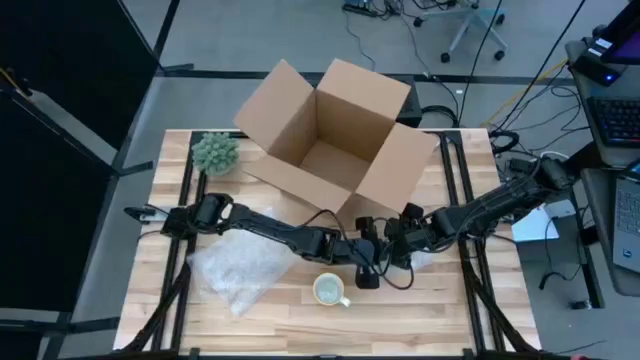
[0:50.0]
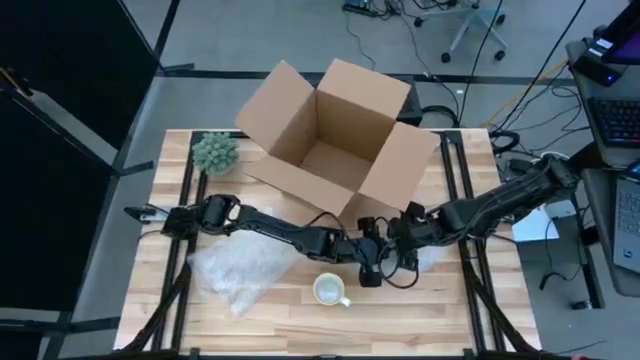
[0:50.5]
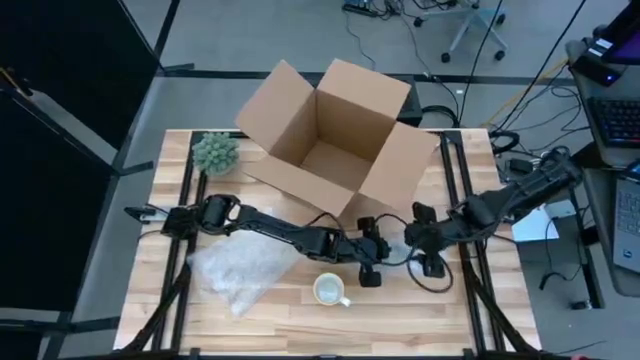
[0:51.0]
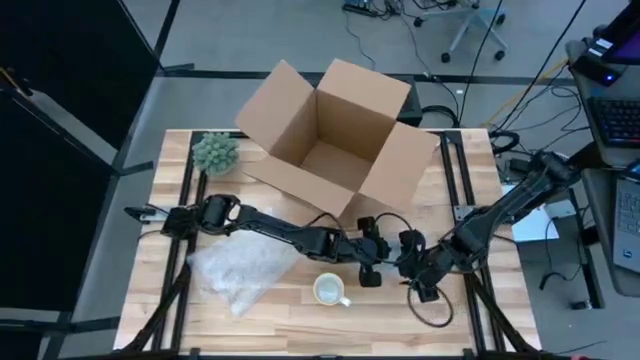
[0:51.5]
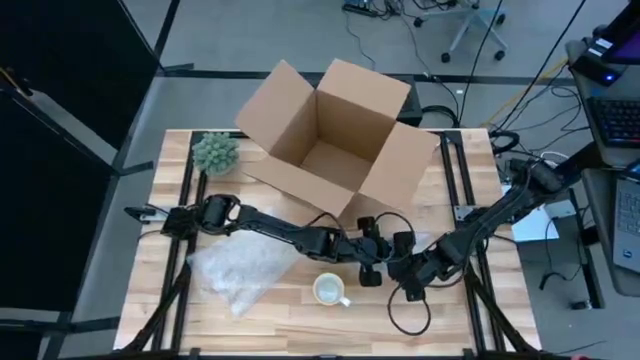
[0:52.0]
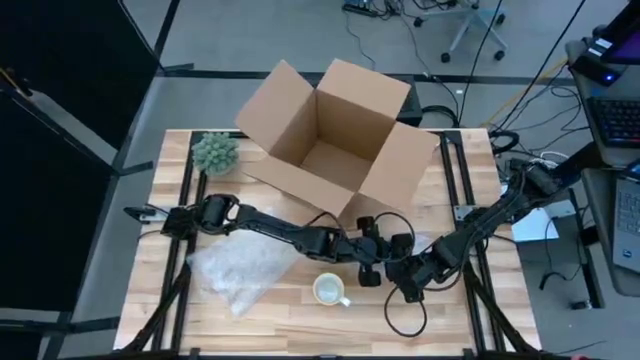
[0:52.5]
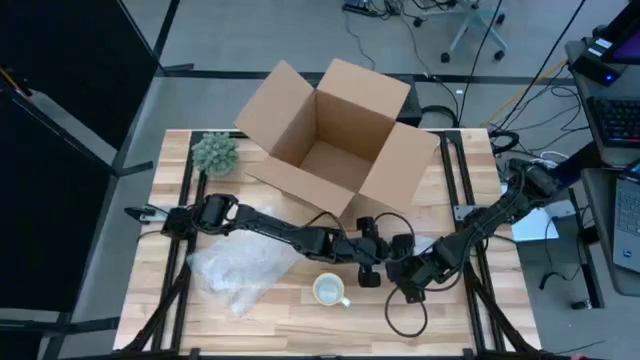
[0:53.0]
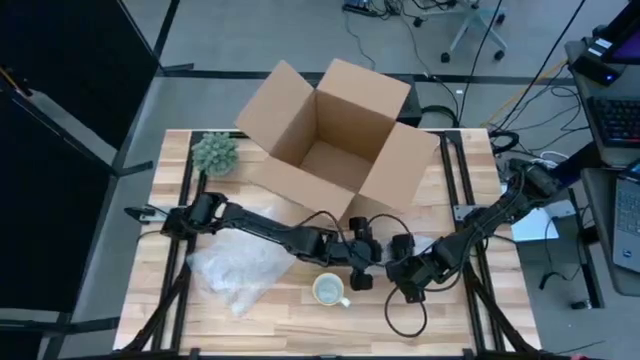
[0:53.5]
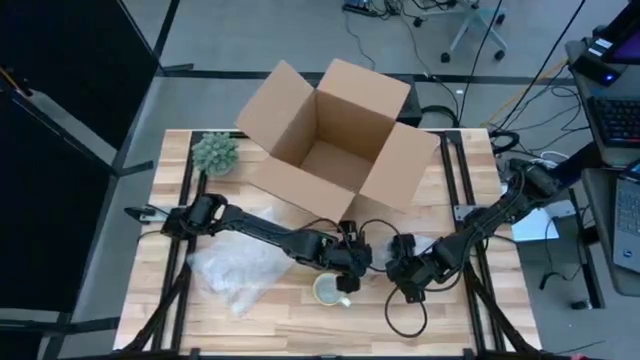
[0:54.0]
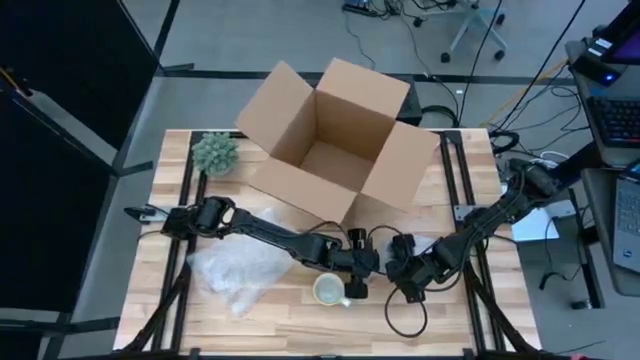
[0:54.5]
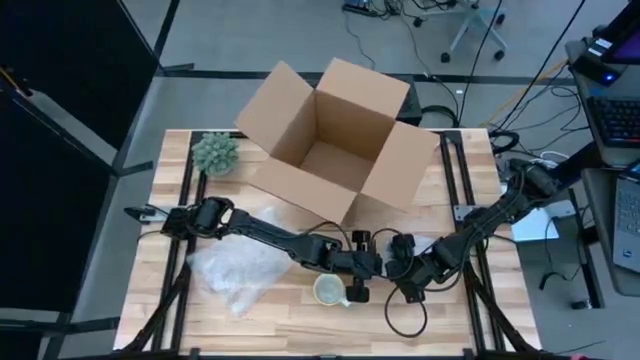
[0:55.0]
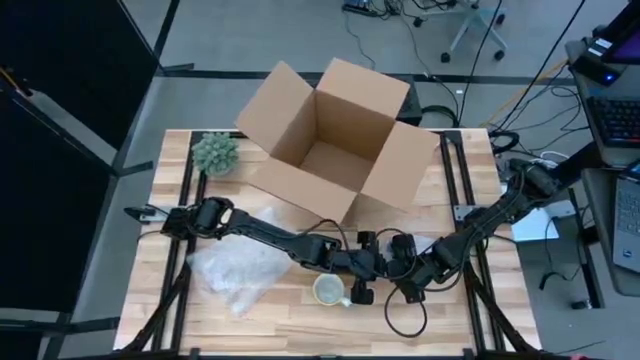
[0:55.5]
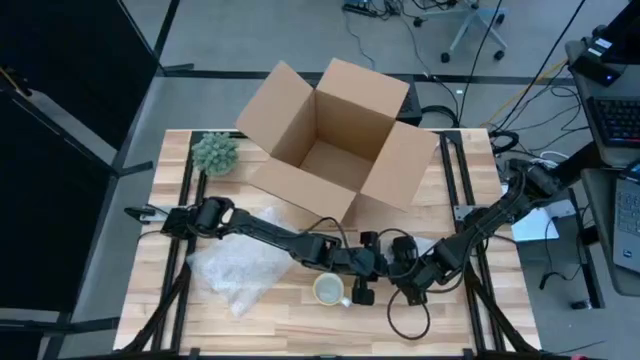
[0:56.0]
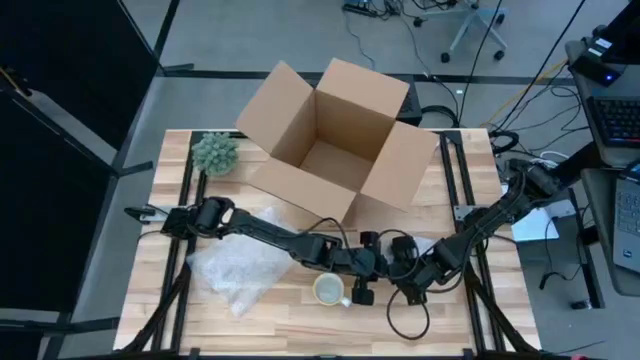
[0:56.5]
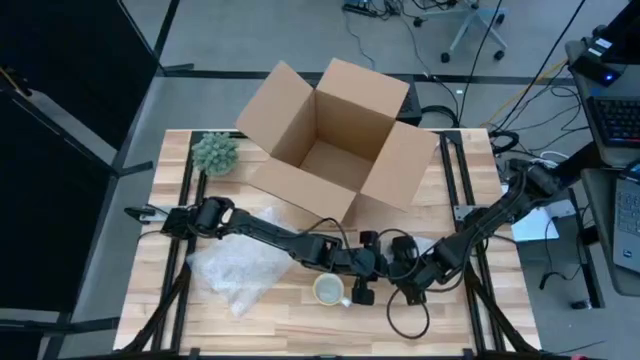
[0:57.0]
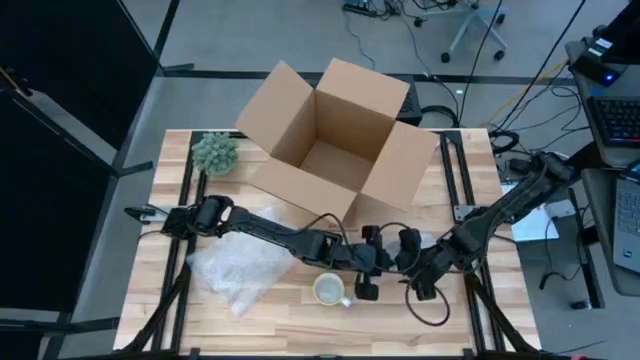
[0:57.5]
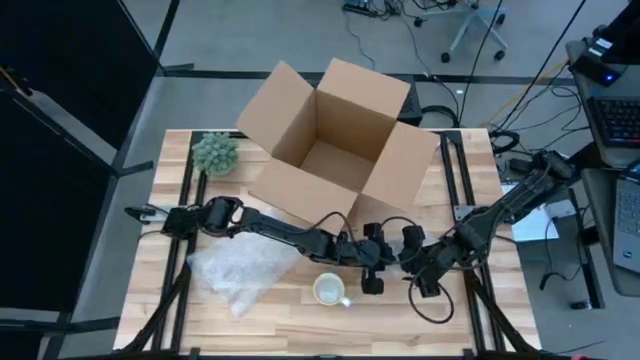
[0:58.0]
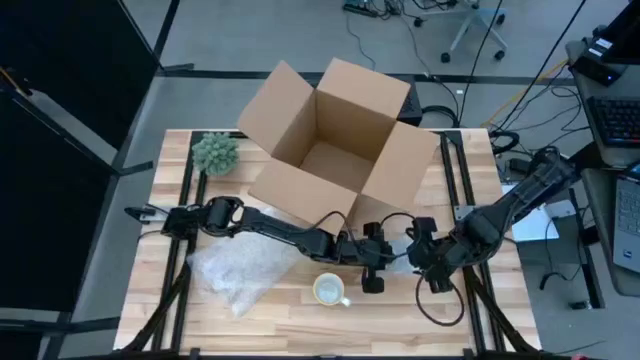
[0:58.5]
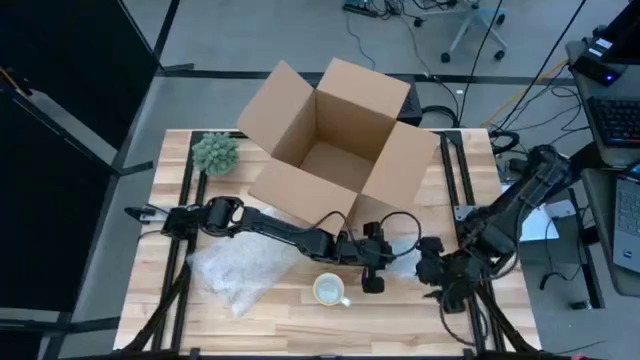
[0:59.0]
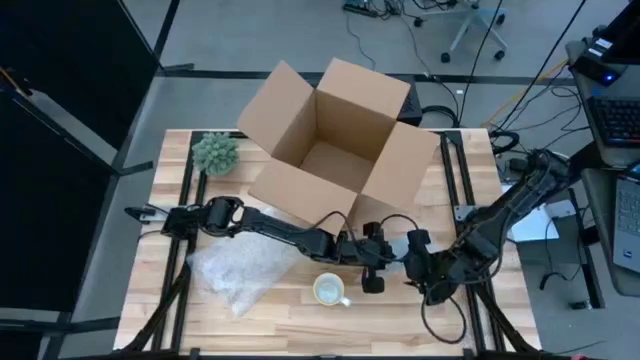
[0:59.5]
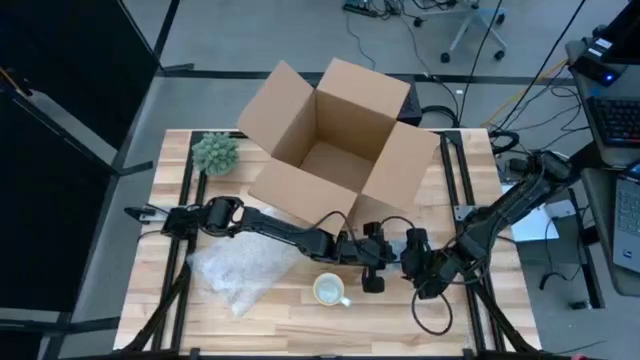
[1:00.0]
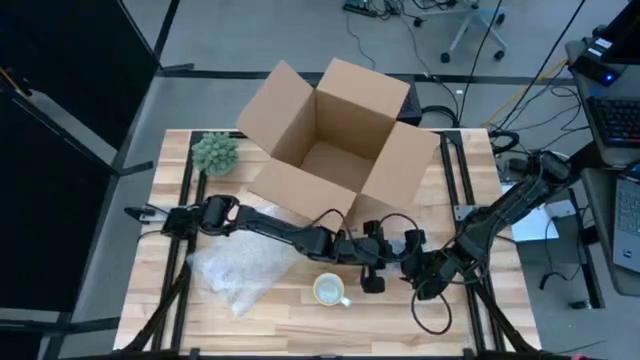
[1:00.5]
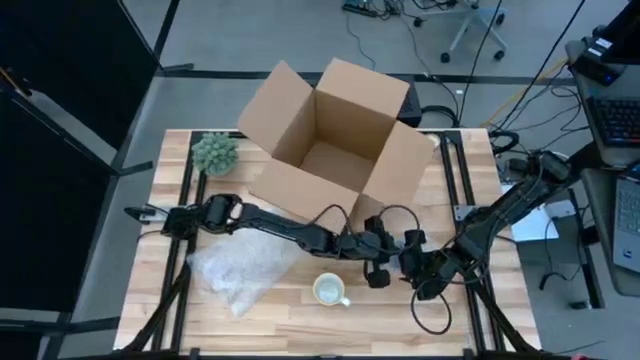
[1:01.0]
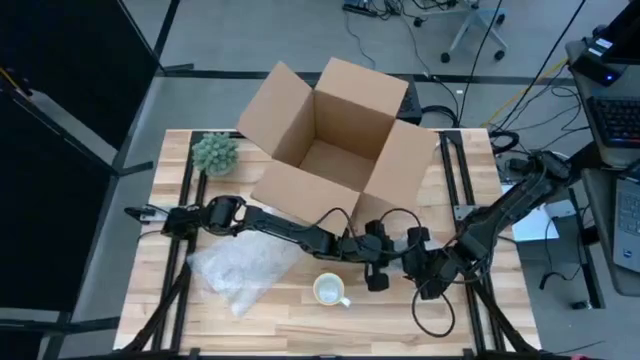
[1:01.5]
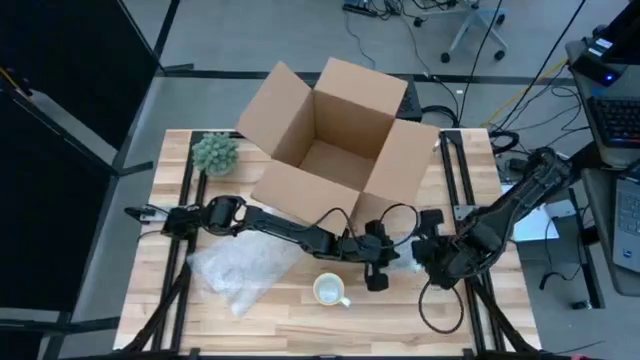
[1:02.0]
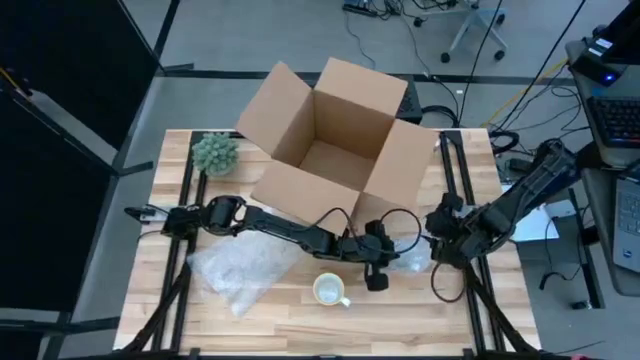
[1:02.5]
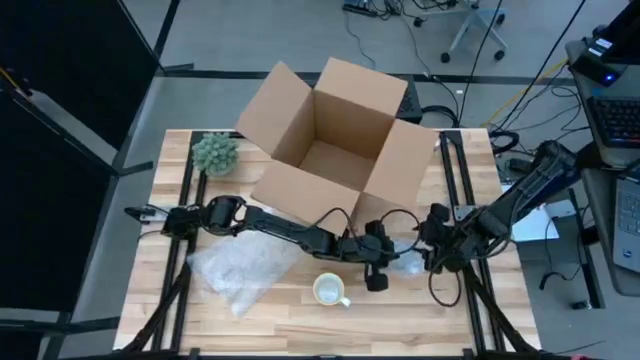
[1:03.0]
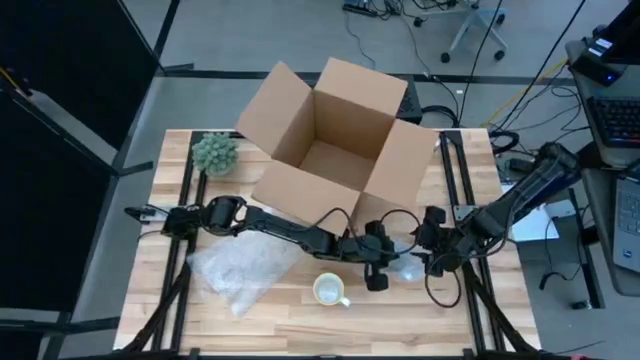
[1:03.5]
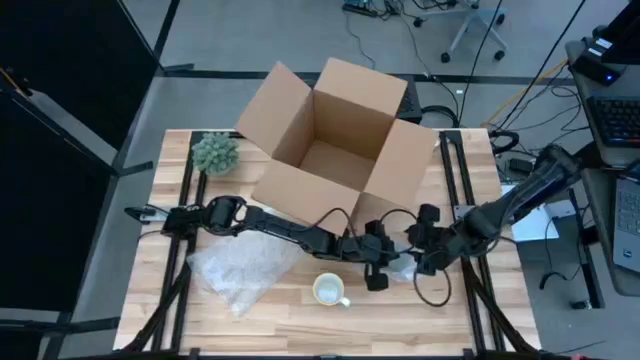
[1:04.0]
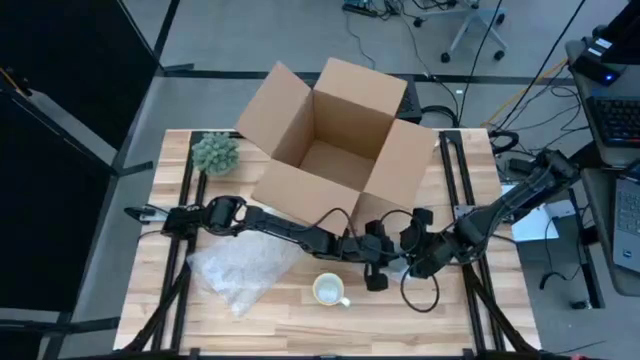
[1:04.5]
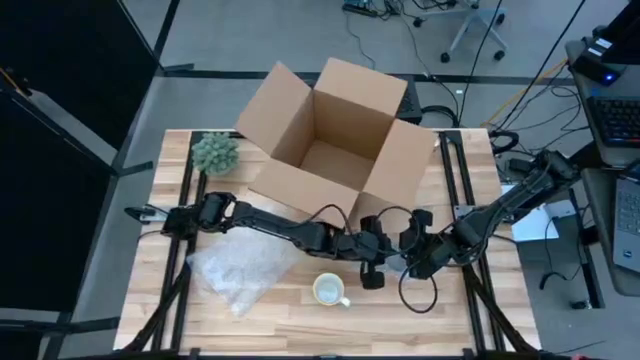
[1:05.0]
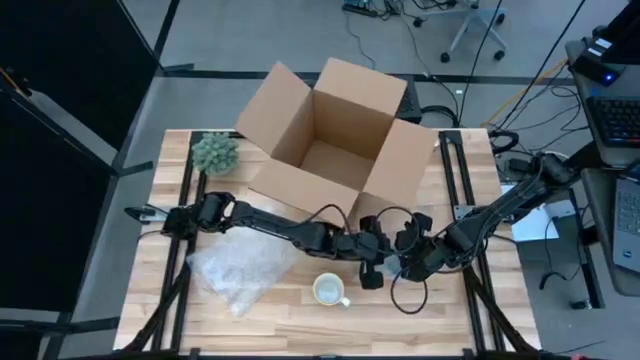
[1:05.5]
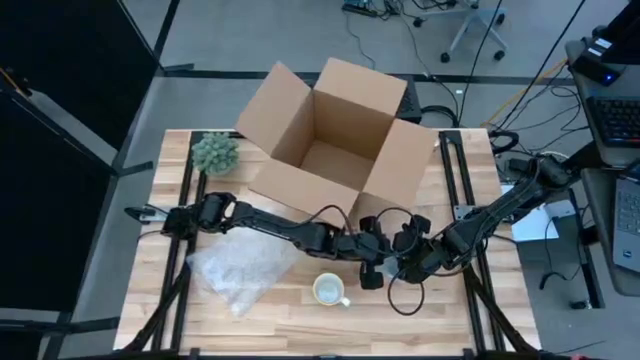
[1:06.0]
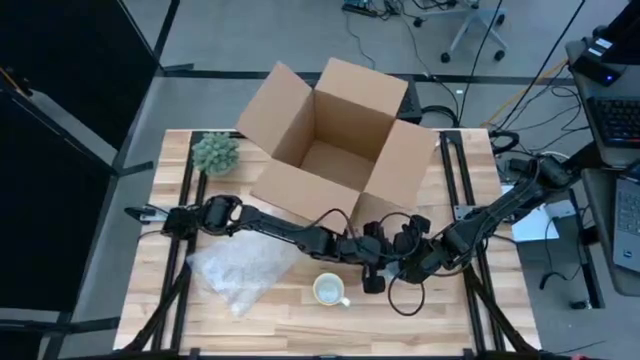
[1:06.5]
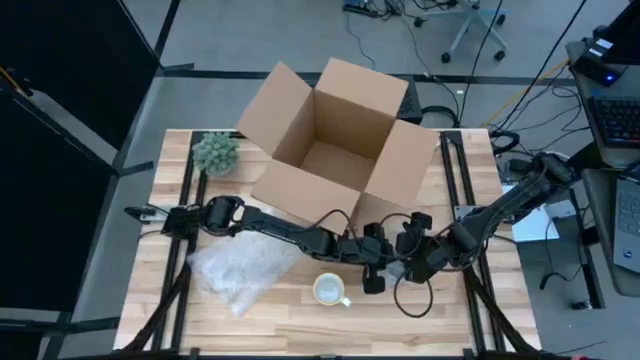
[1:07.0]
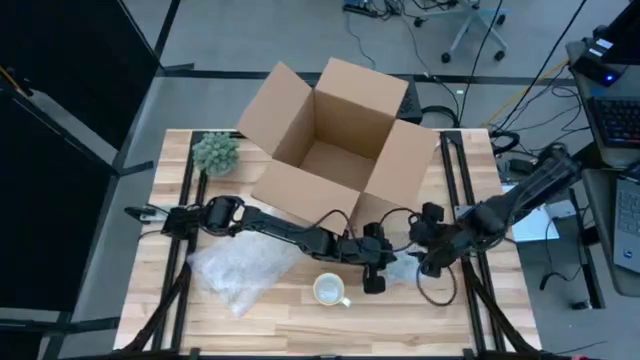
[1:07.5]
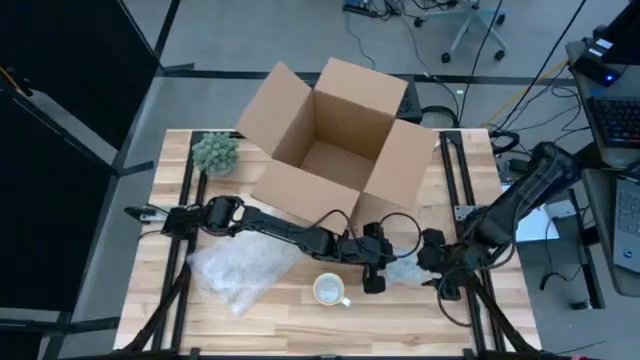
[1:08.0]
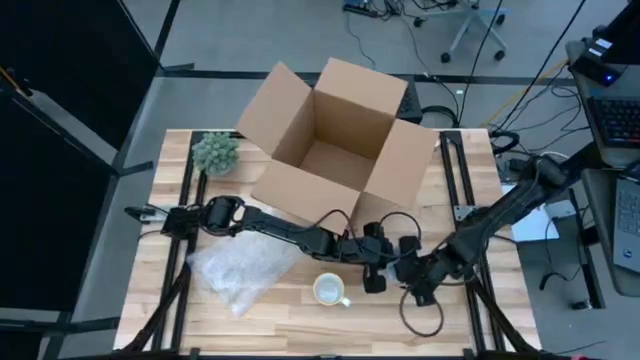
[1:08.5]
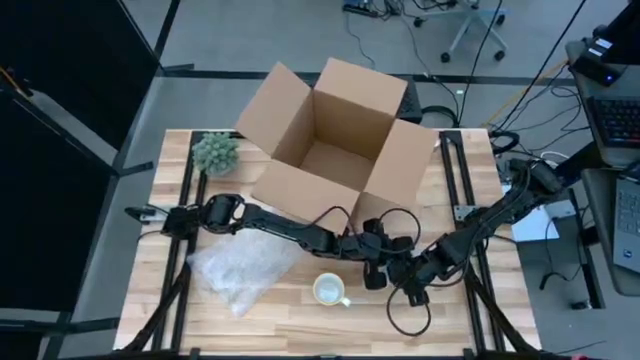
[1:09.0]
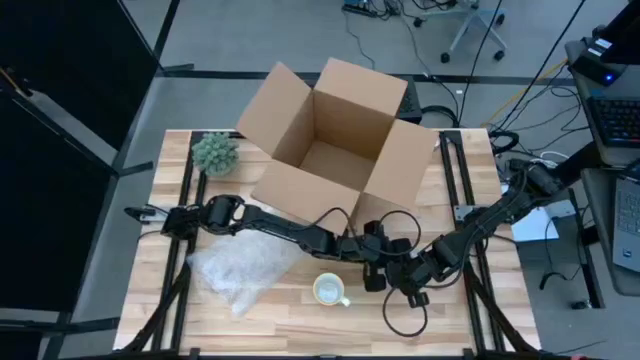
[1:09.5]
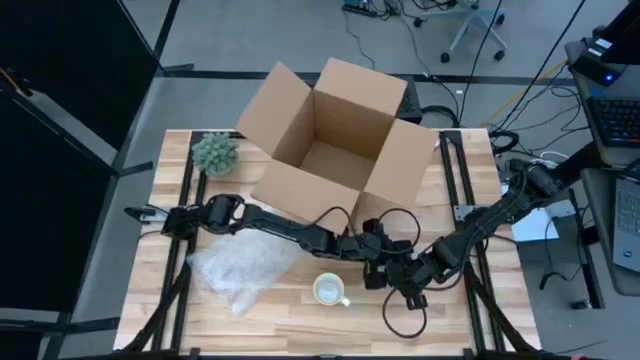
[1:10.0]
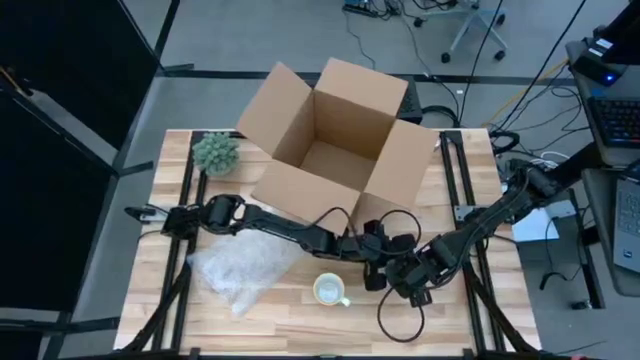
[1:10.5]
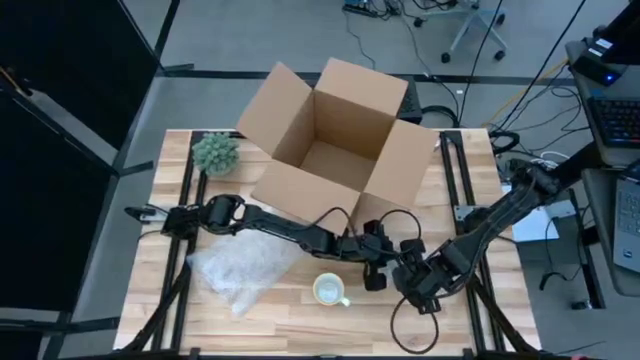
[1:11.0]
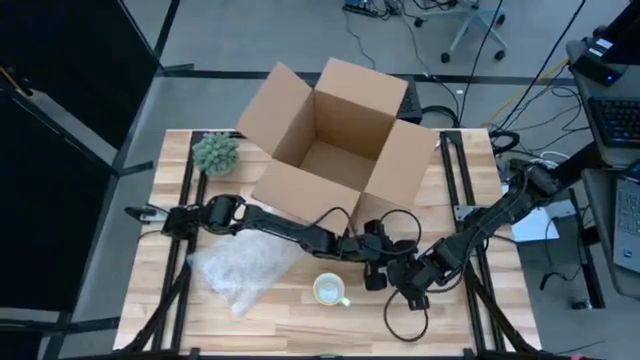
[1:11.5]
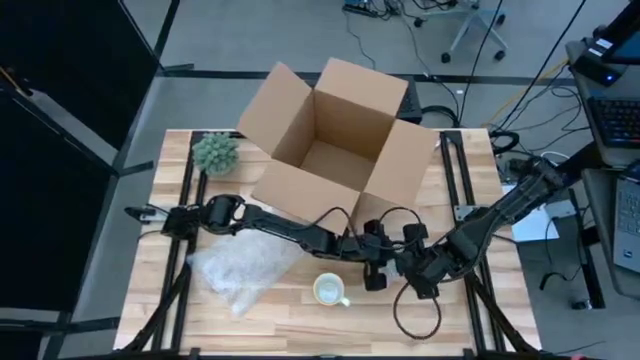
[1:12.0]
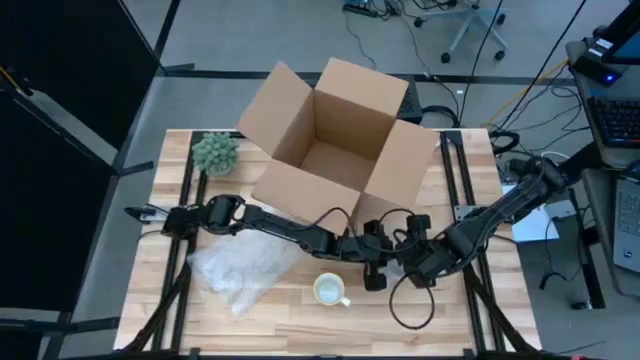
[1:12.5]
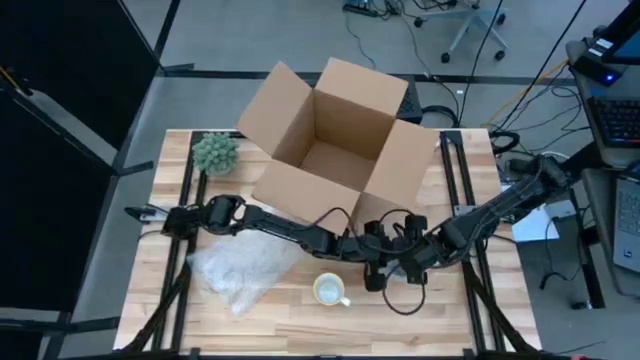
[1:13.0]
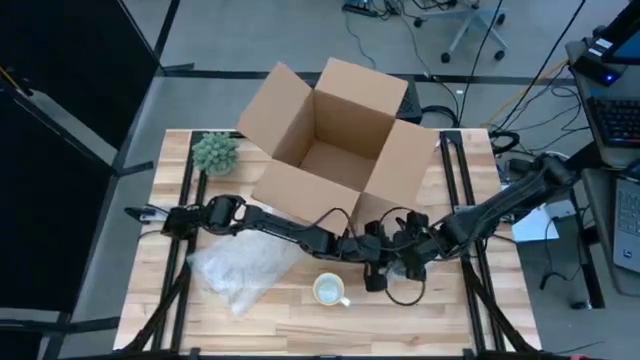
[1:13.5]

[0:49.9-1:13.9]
Task: wrap mug
Wrap the red mug with bubble wrap
